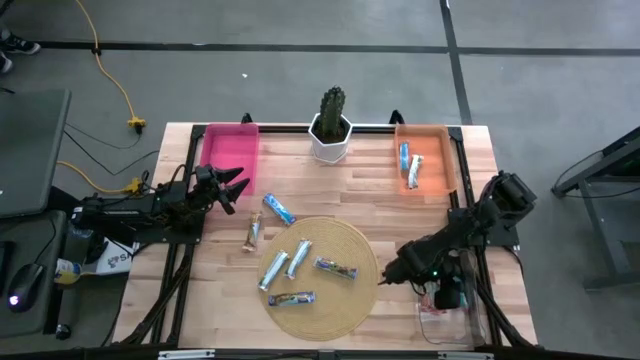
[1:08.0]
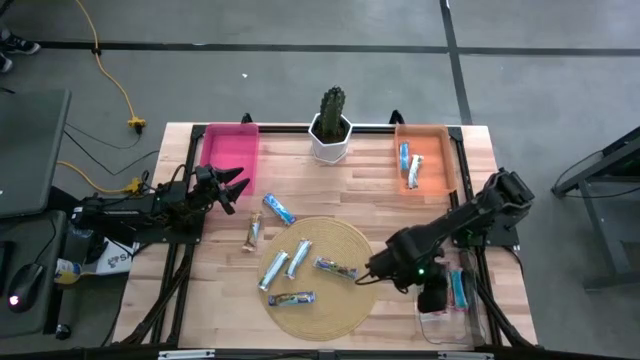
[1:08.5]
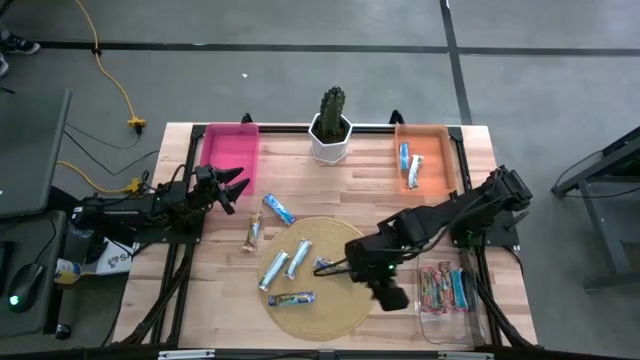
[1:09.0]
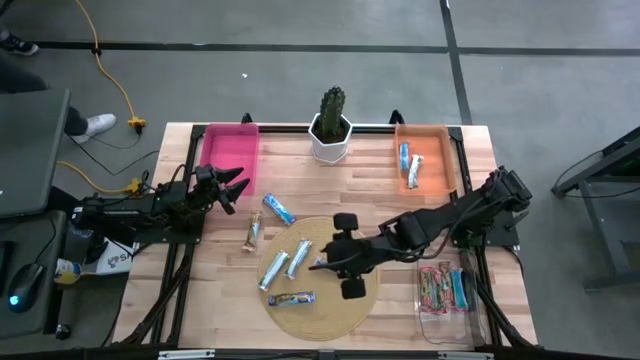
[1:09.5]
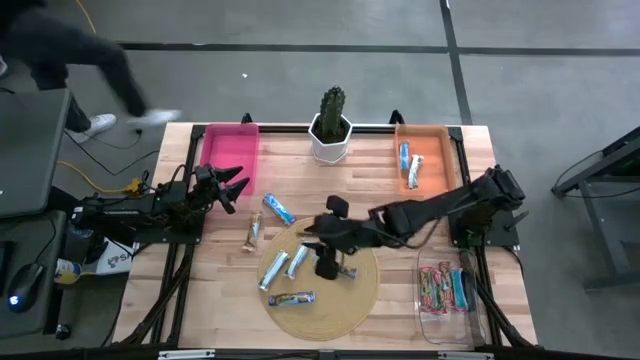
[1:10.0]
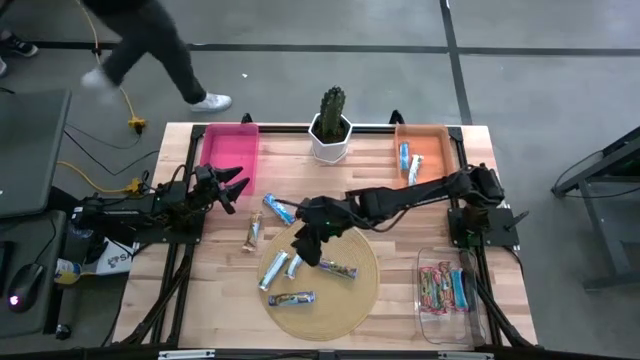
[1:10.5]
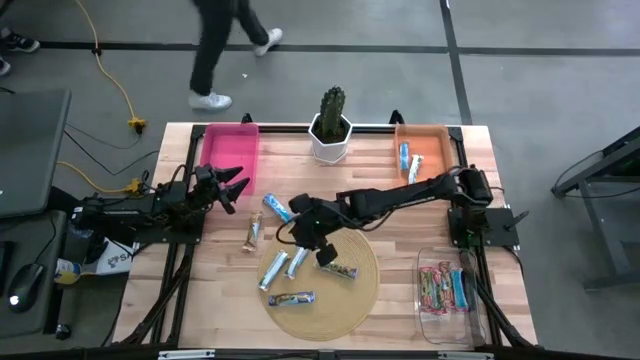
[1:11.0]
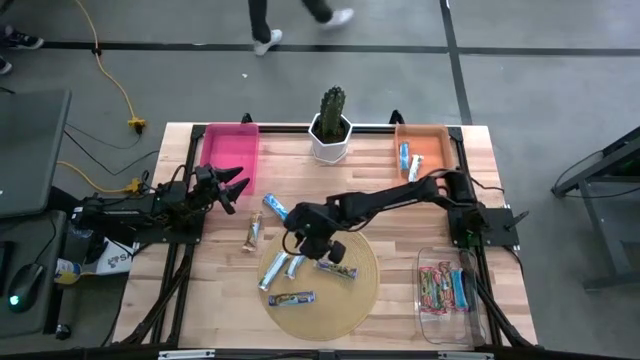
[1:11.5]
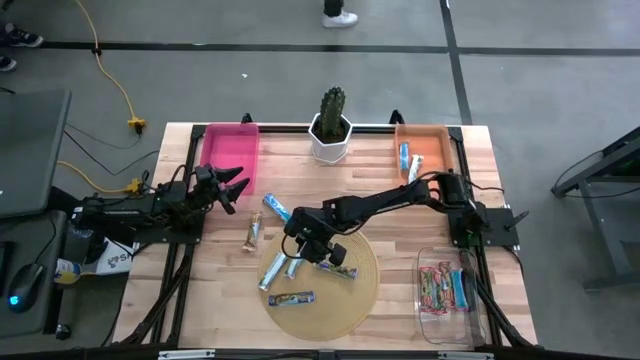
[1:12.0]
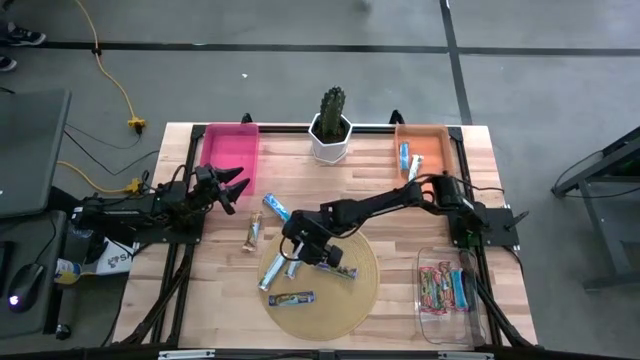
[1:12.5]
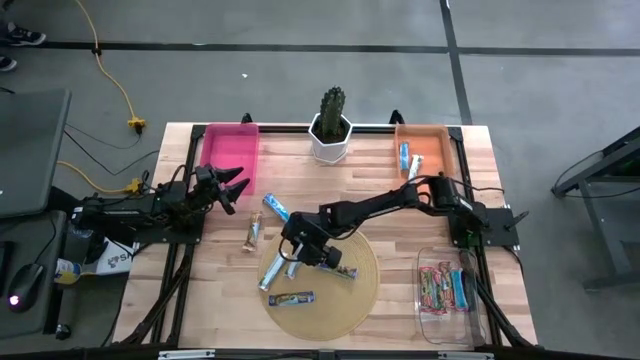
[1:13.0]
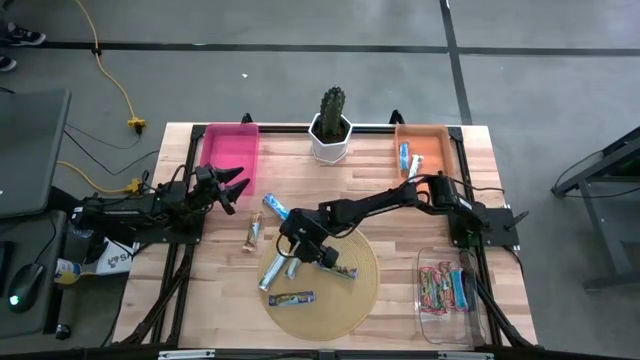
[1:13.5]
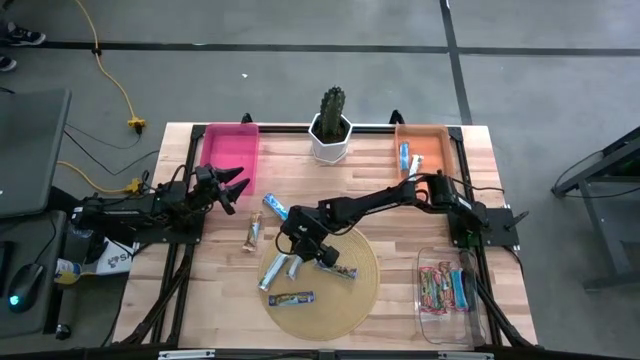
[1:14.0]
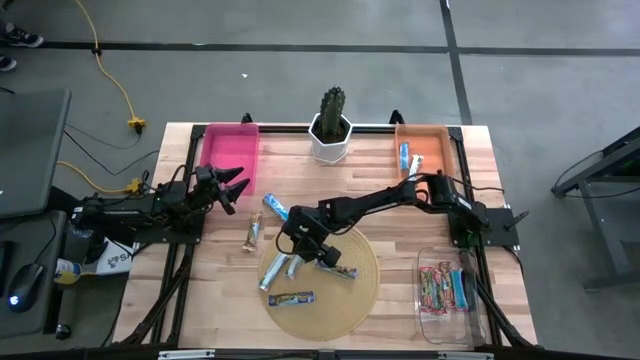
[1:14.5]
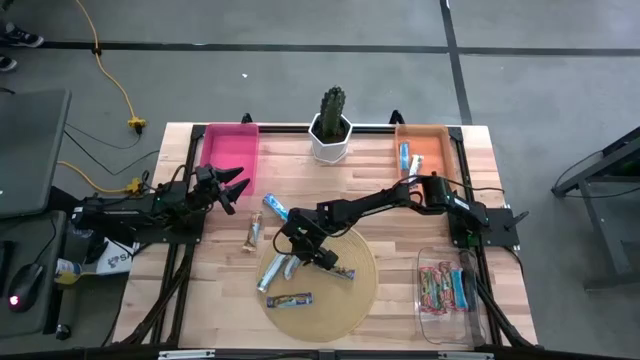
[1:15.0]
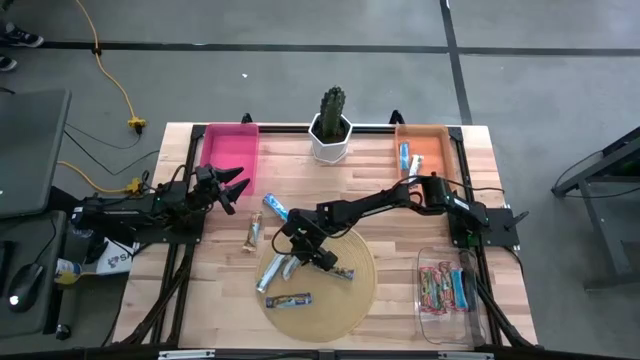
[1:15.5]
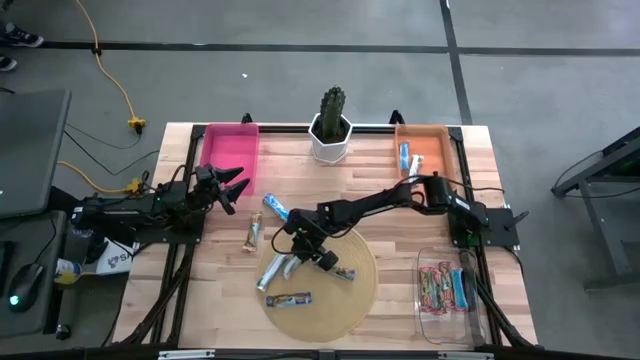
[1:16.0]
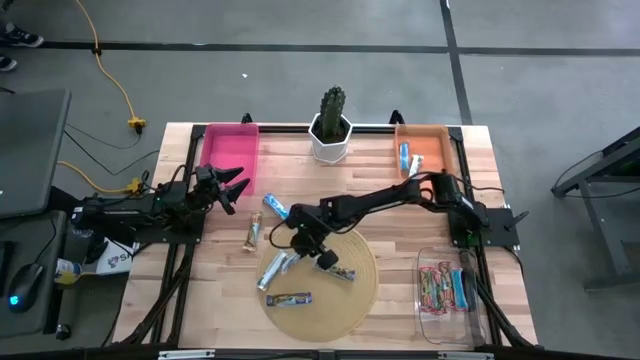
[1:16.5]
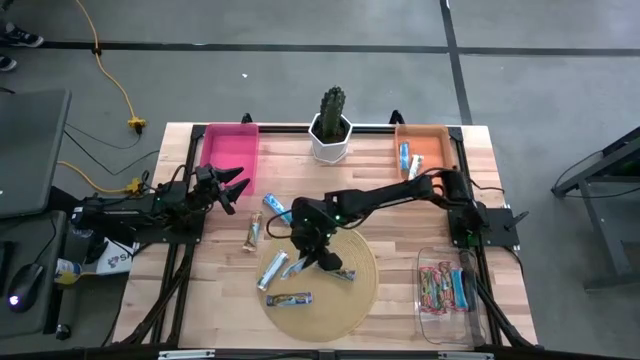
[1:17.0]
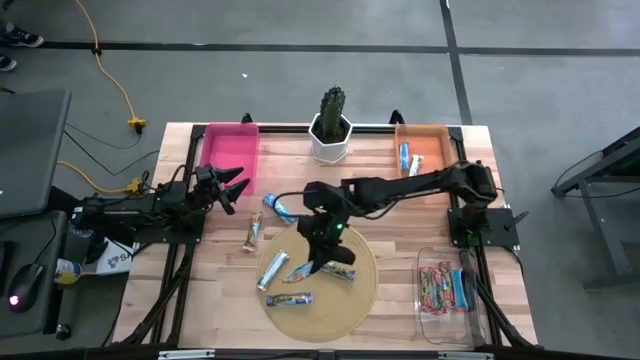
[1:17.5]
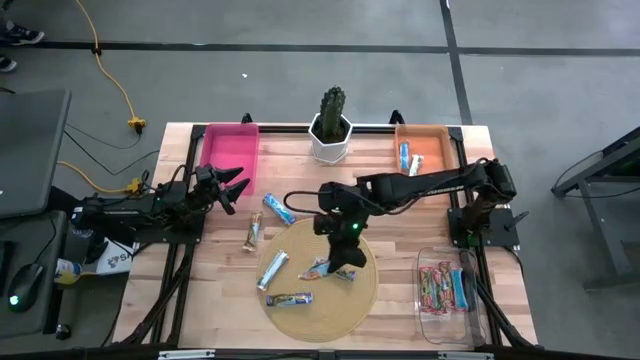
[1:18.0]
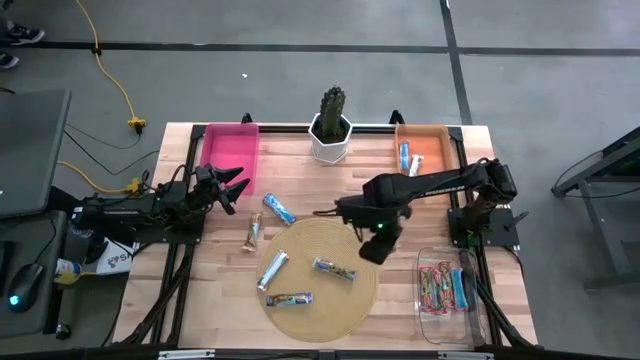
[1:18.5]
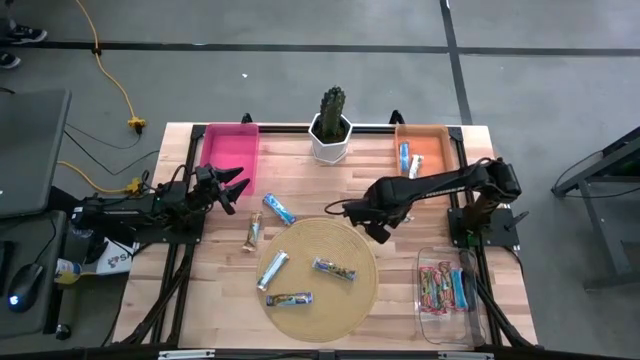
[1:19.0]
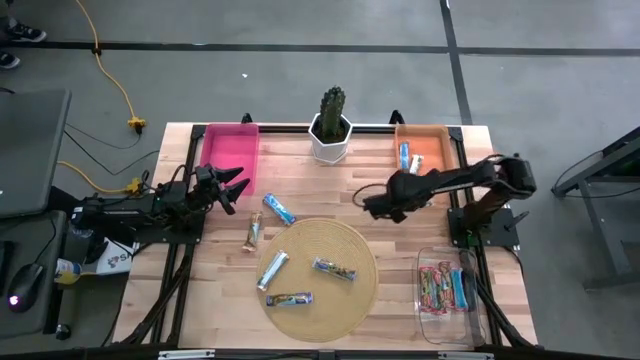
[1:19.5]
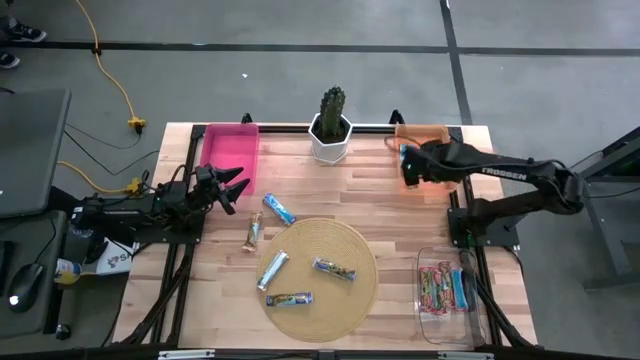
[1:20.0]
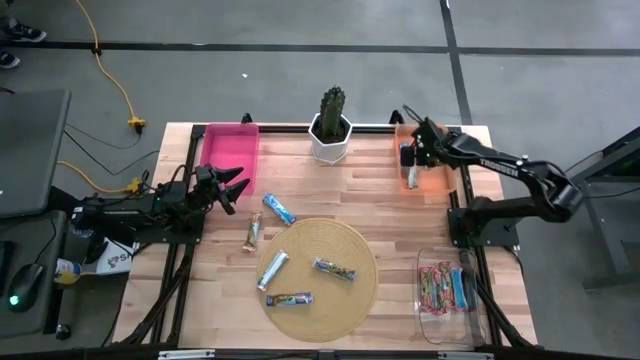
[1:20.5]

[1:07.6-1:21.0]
Task: Pick and place Granola Bars by type
Put the yellow granola bar into the orange bin

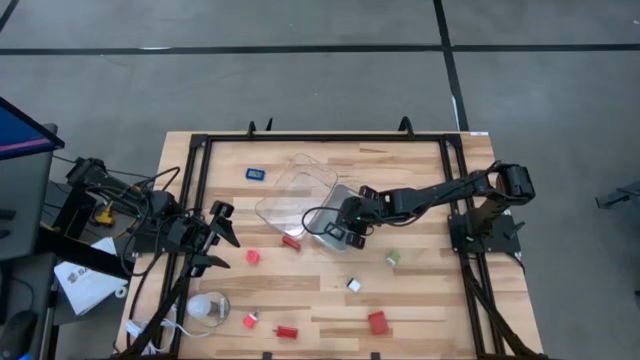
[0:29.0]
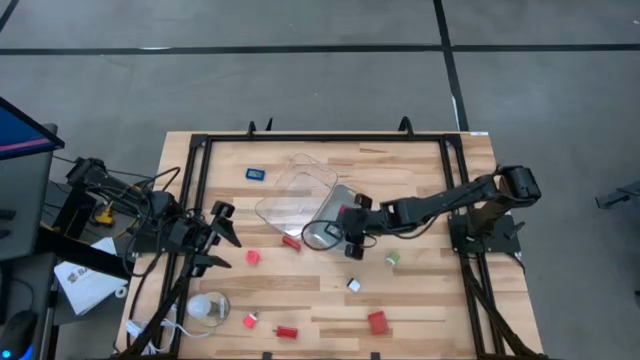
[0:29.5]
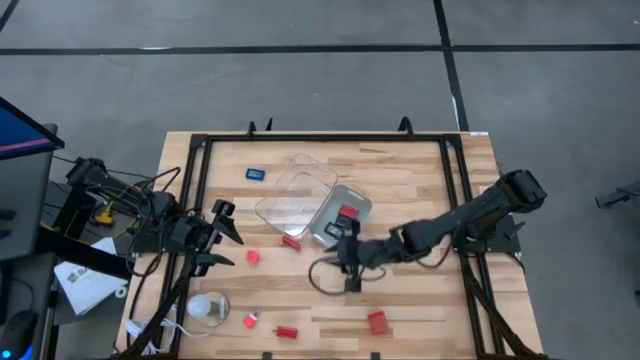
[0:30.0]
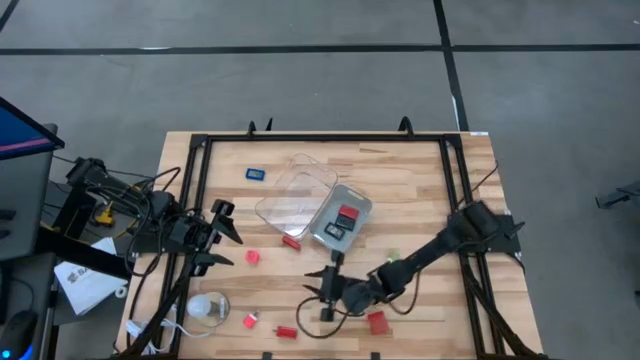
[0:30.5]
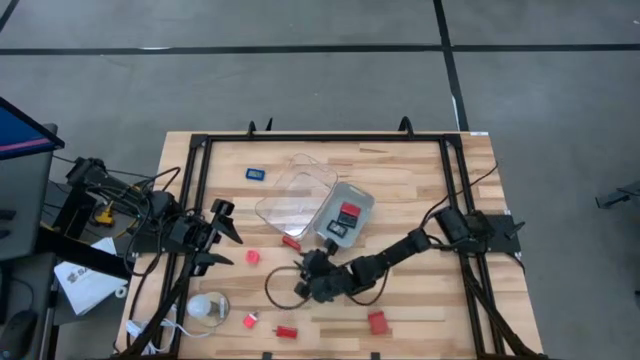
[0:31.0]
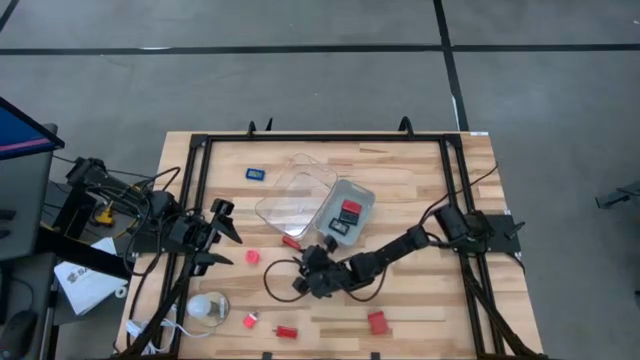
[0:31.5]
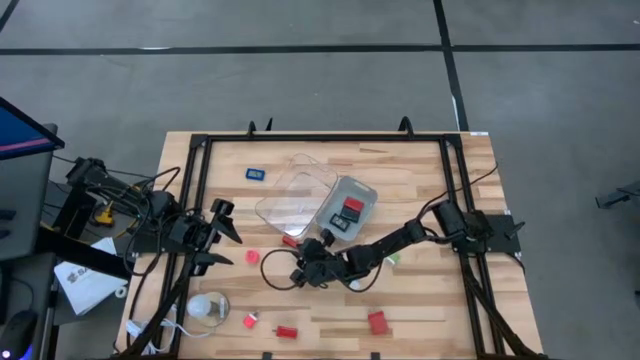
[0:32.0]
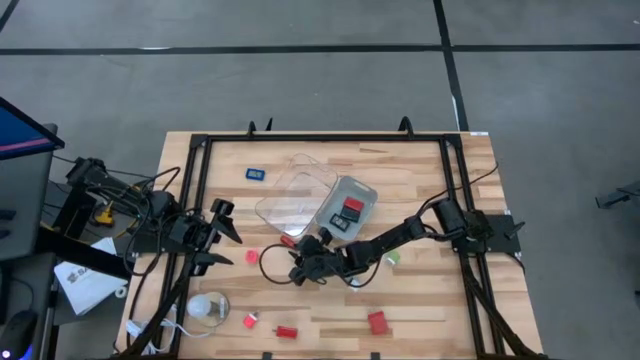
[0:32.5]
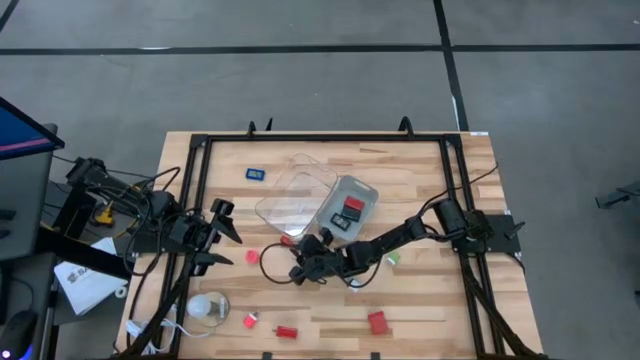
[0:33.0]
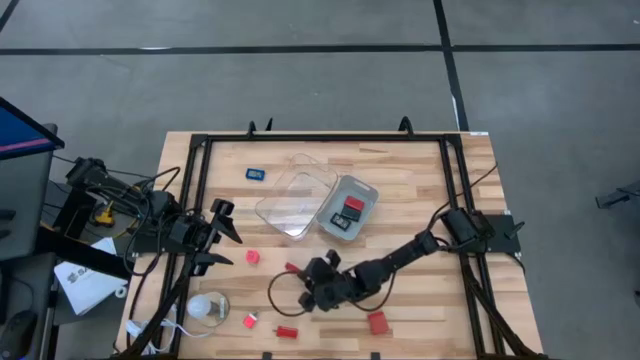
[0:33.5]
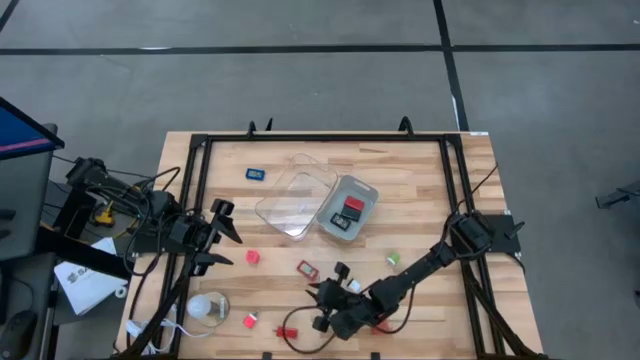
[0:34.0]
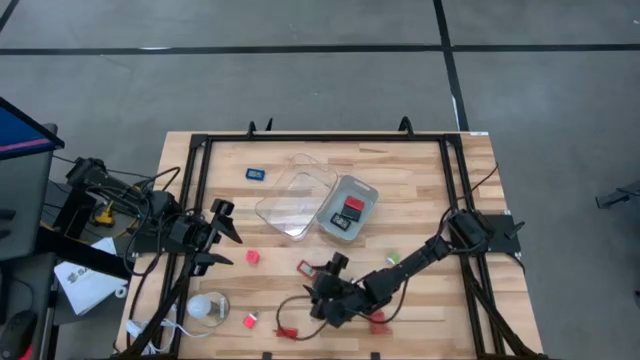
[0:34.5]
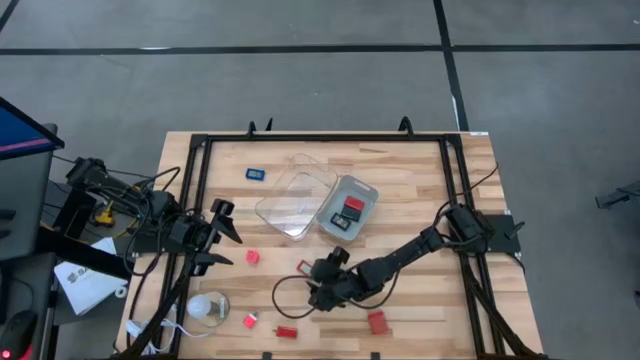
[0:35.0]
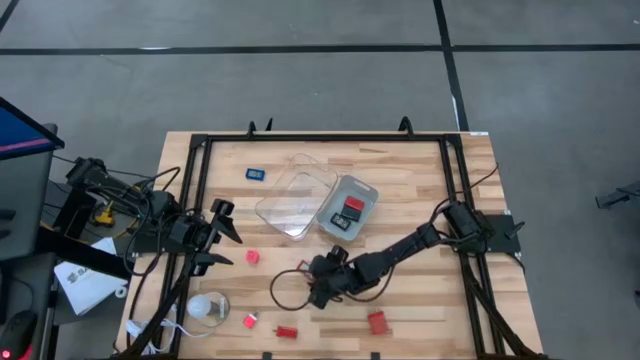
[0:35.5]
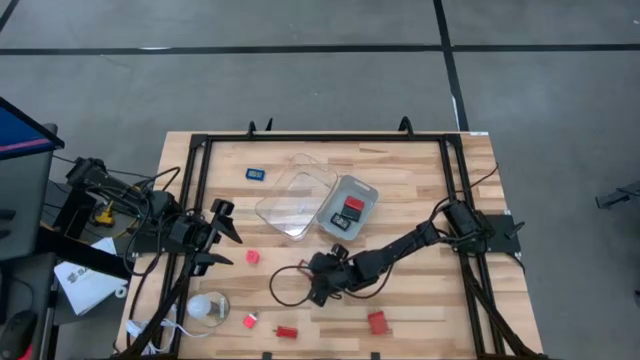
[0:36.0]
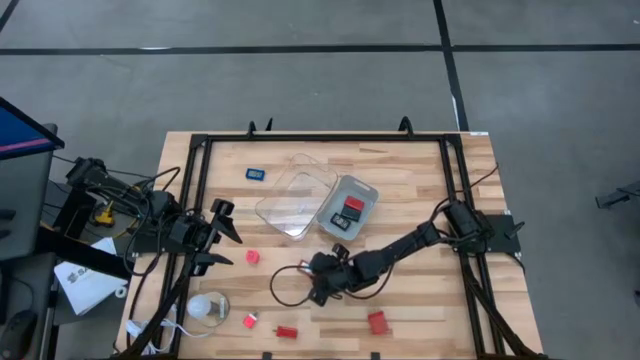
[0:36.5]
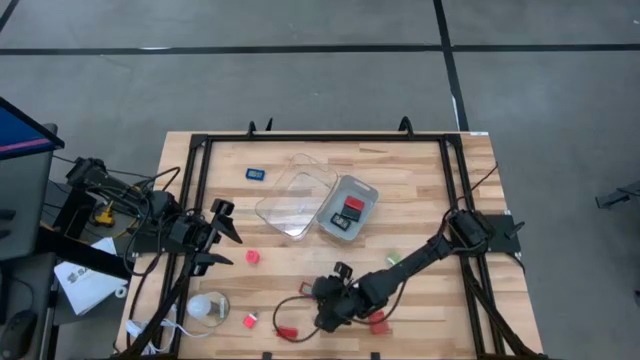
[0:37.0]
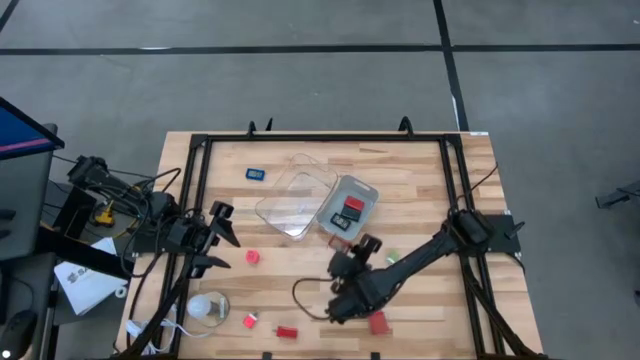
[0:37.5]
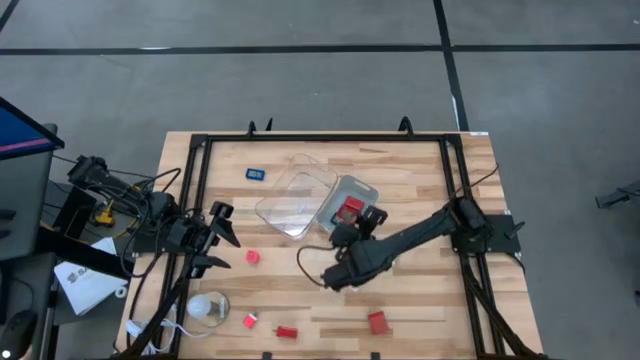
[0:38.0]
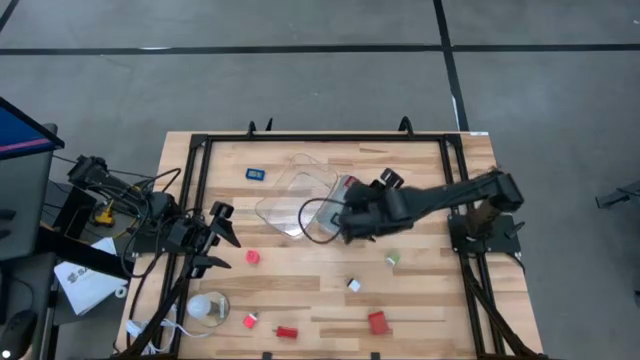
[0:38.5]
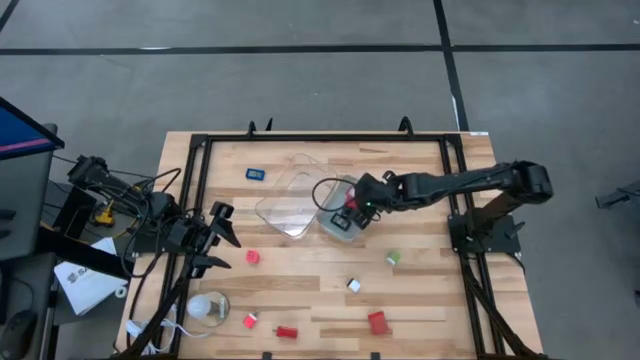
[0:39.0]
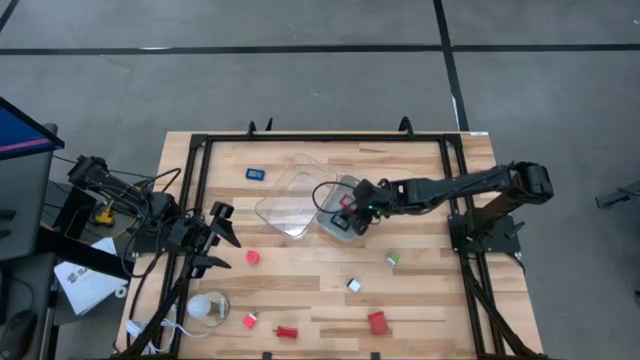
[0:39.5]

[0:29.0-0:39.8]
Task: Pick & Place Office items
Put the red digital timer into the gray bin
